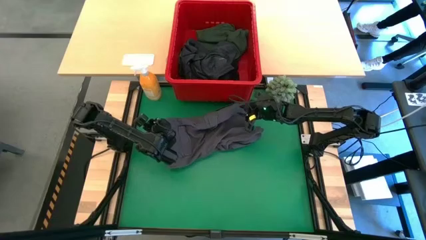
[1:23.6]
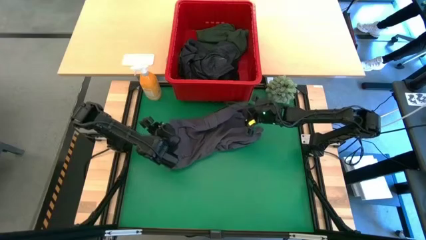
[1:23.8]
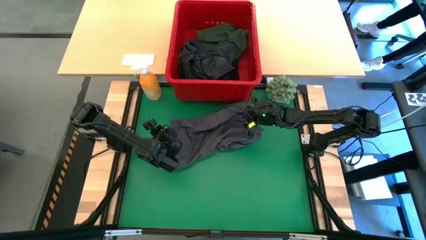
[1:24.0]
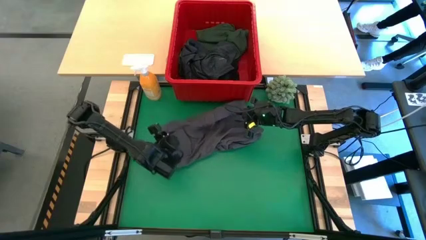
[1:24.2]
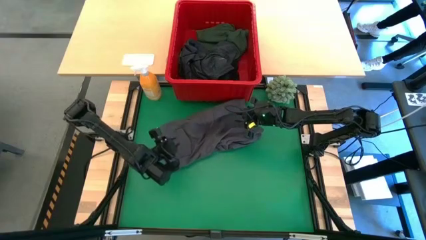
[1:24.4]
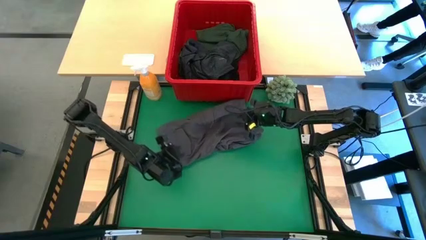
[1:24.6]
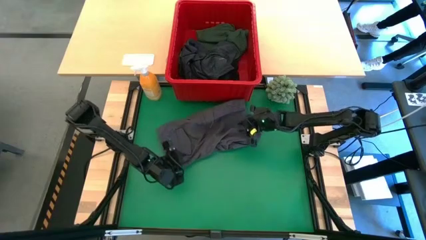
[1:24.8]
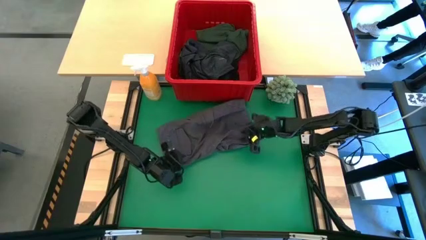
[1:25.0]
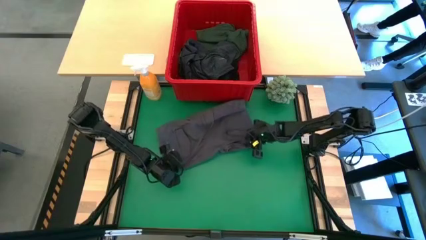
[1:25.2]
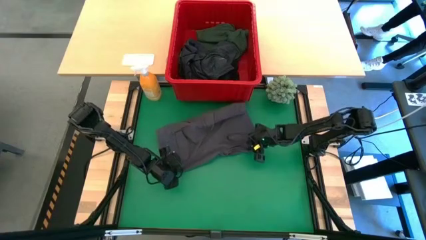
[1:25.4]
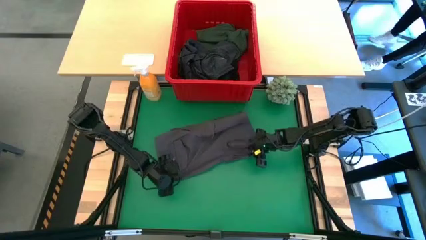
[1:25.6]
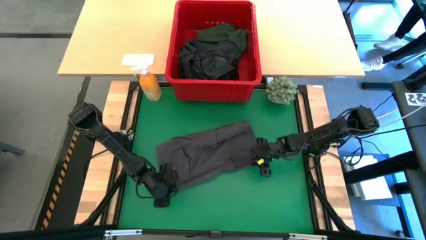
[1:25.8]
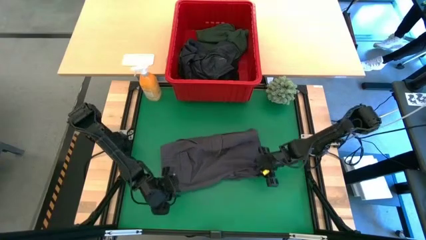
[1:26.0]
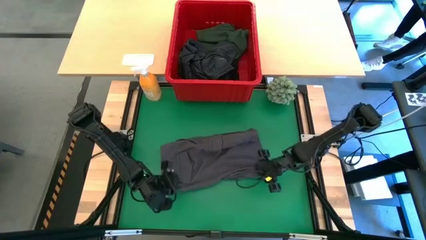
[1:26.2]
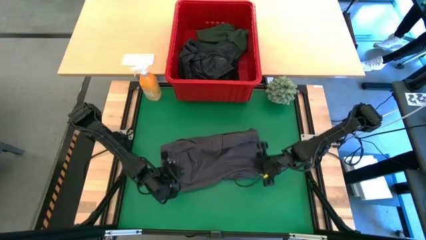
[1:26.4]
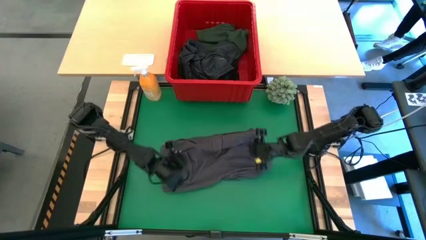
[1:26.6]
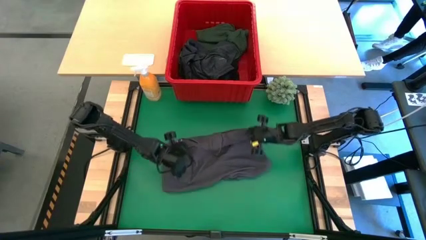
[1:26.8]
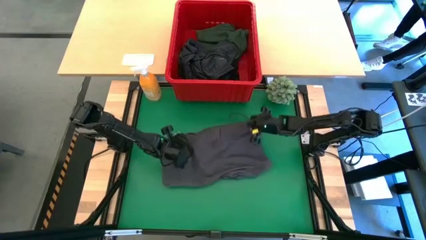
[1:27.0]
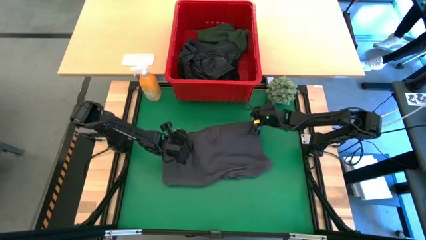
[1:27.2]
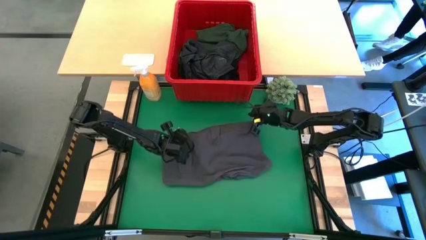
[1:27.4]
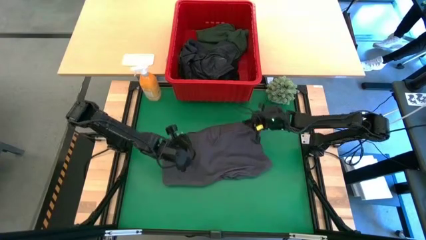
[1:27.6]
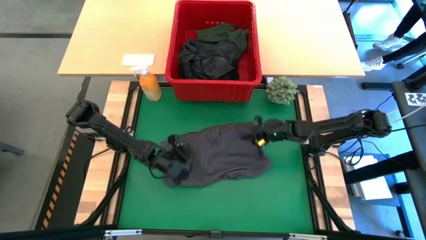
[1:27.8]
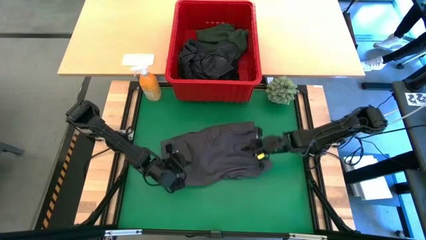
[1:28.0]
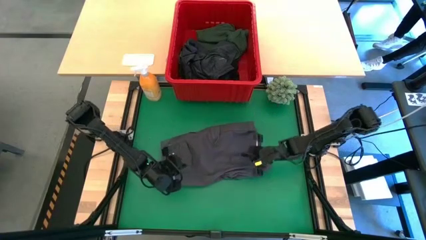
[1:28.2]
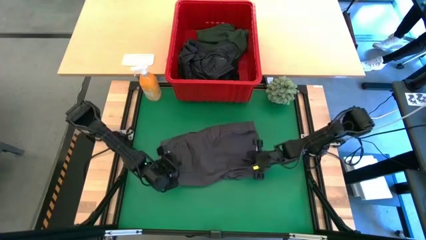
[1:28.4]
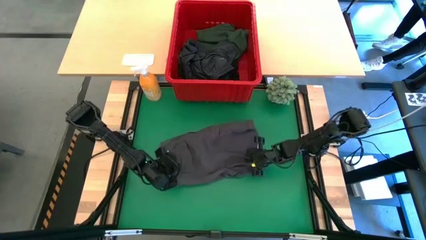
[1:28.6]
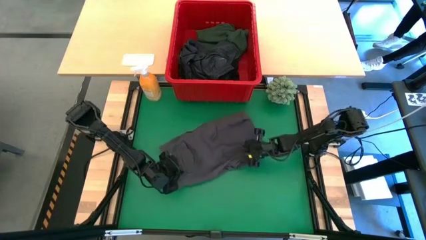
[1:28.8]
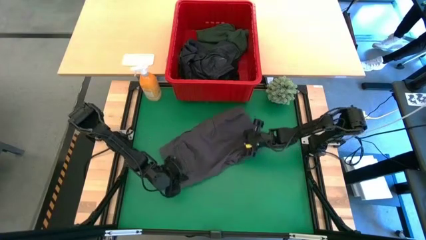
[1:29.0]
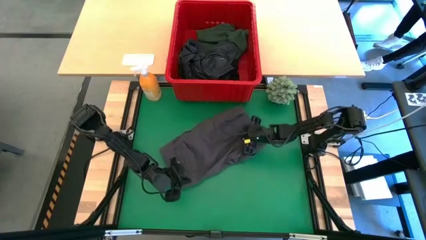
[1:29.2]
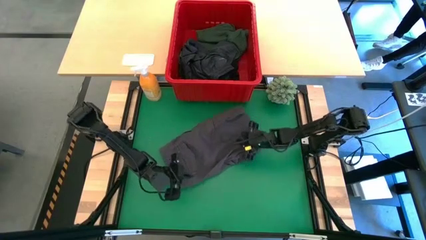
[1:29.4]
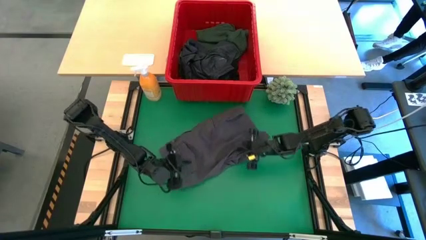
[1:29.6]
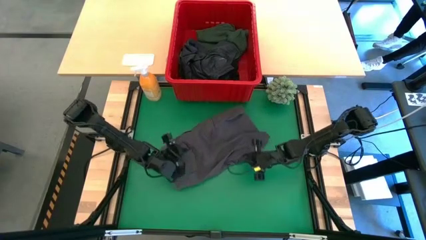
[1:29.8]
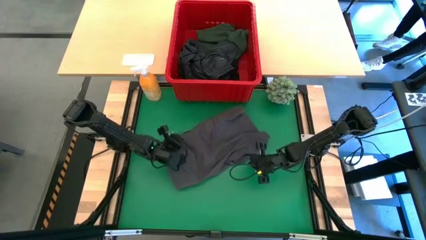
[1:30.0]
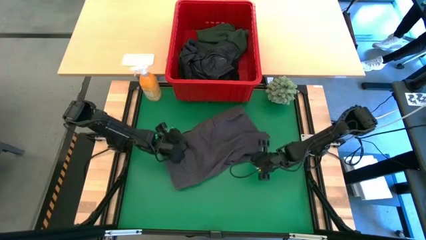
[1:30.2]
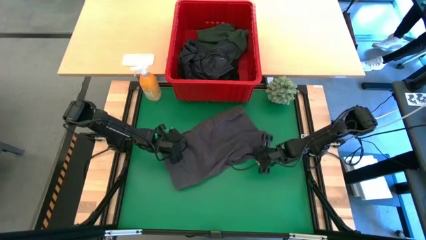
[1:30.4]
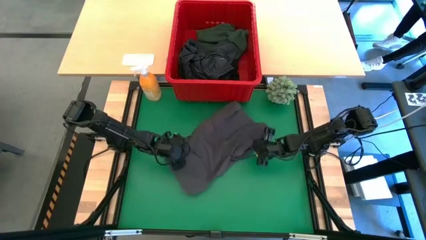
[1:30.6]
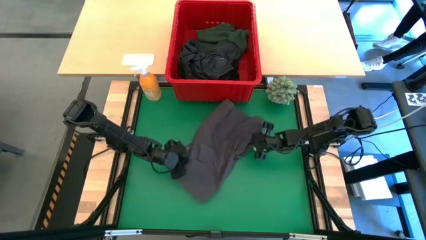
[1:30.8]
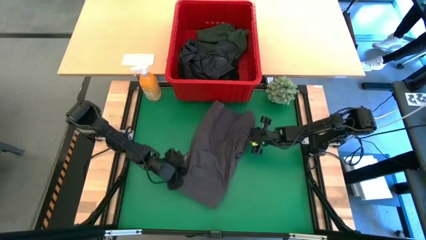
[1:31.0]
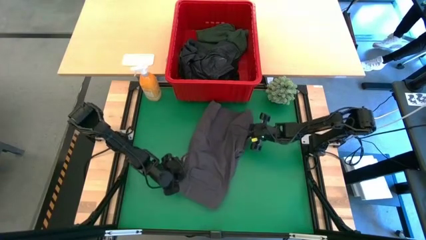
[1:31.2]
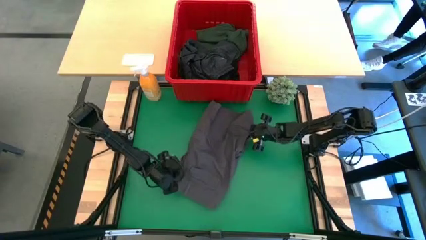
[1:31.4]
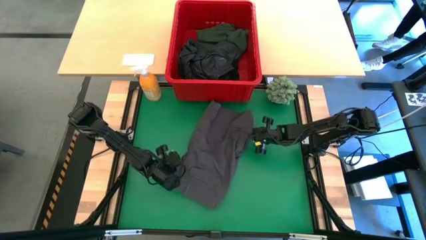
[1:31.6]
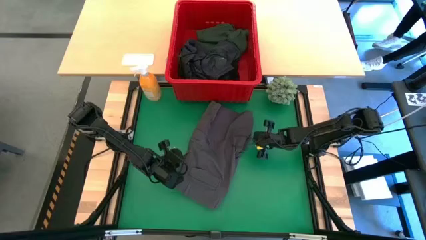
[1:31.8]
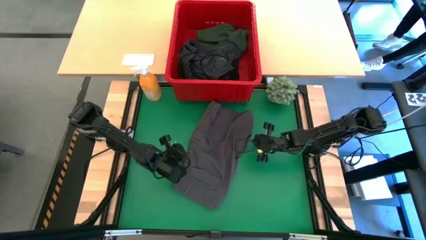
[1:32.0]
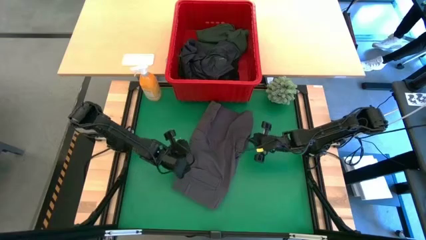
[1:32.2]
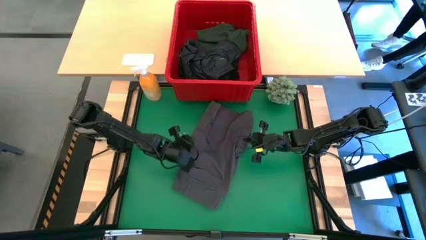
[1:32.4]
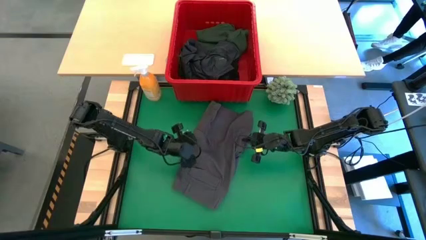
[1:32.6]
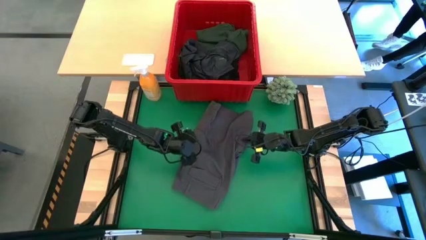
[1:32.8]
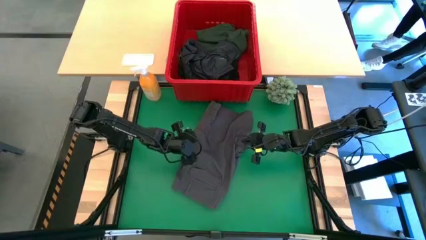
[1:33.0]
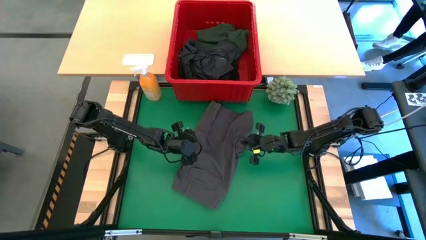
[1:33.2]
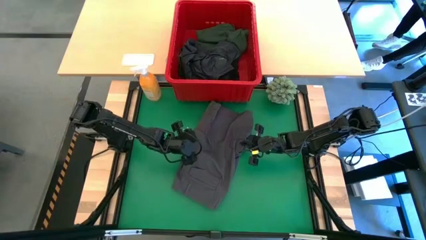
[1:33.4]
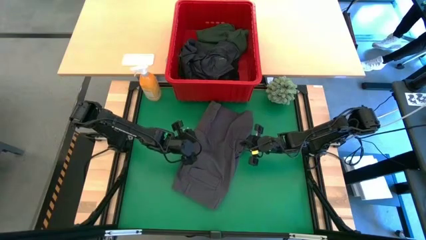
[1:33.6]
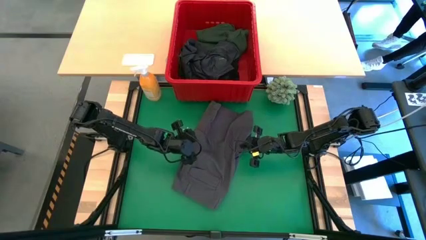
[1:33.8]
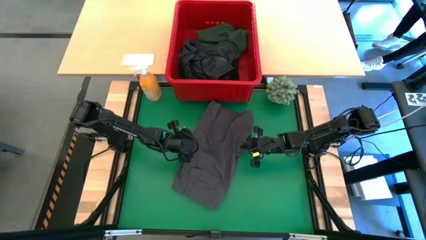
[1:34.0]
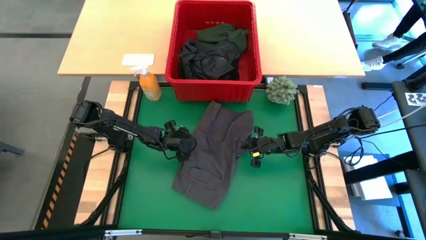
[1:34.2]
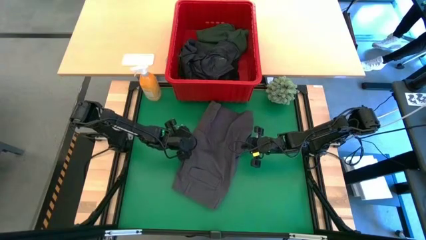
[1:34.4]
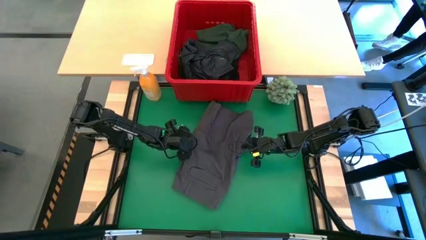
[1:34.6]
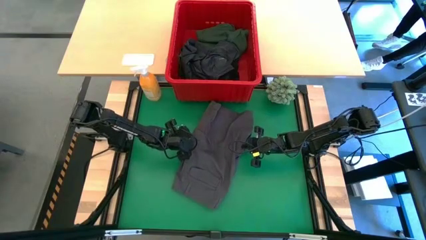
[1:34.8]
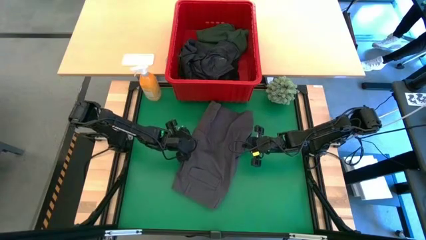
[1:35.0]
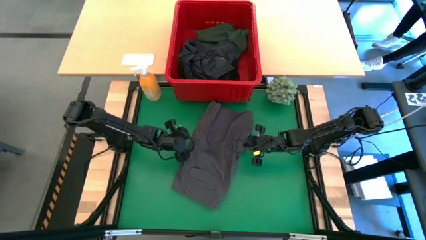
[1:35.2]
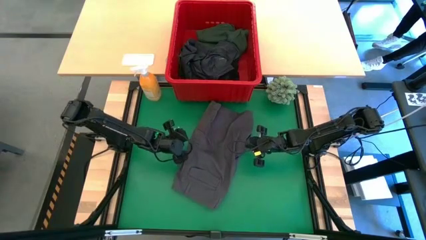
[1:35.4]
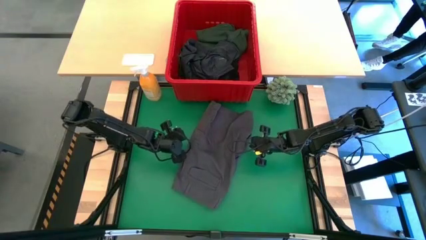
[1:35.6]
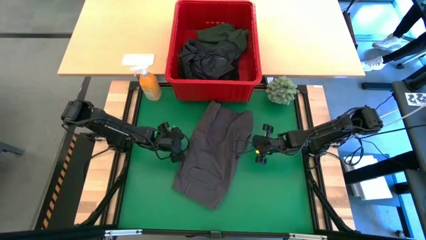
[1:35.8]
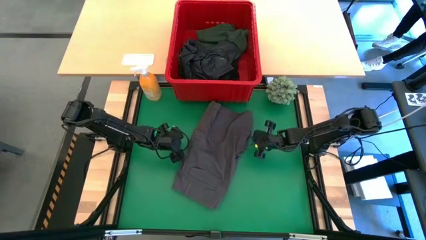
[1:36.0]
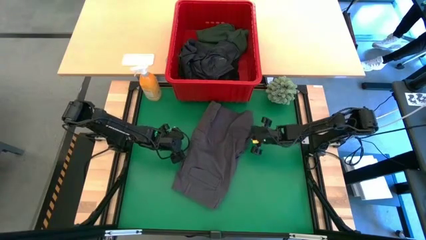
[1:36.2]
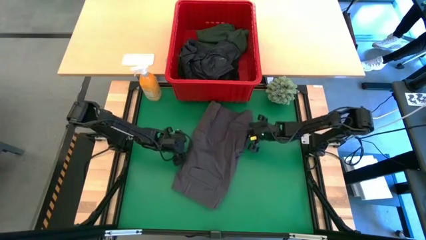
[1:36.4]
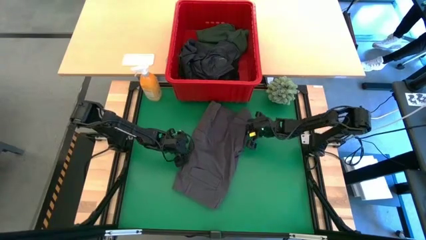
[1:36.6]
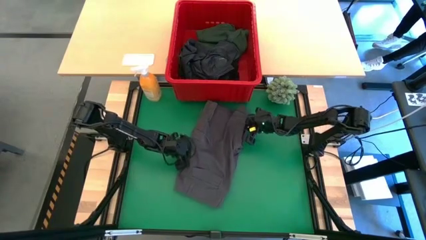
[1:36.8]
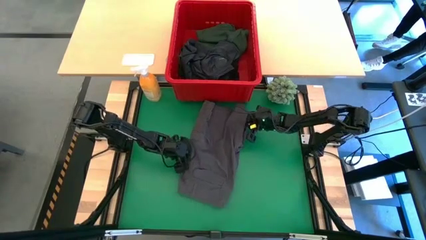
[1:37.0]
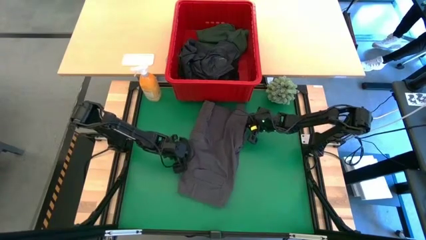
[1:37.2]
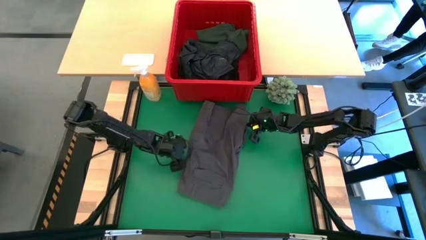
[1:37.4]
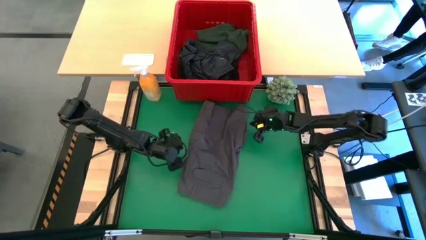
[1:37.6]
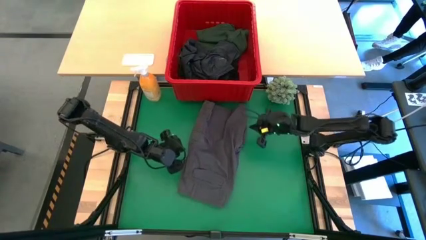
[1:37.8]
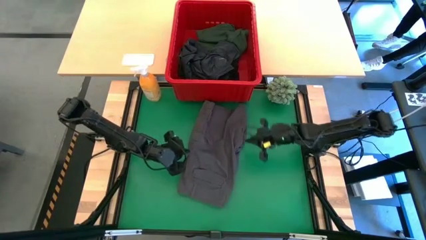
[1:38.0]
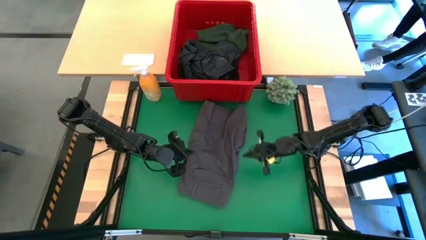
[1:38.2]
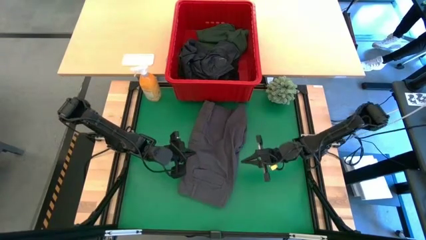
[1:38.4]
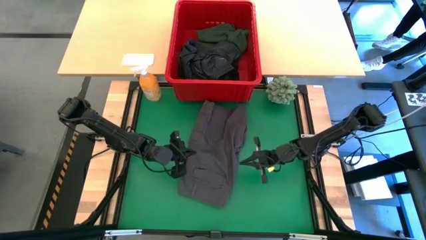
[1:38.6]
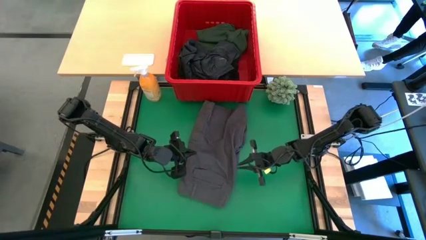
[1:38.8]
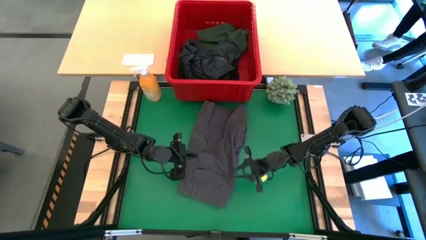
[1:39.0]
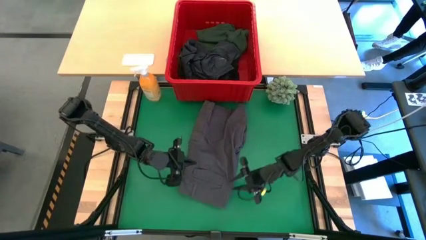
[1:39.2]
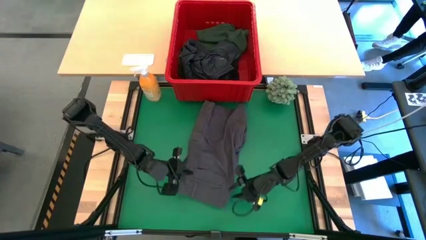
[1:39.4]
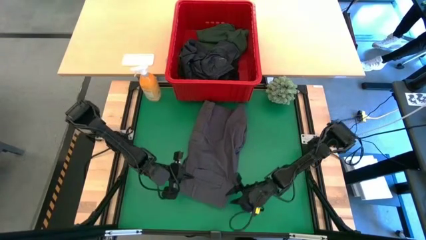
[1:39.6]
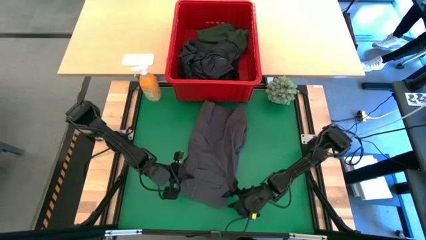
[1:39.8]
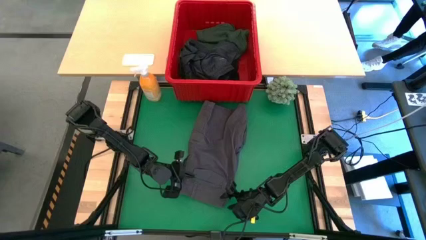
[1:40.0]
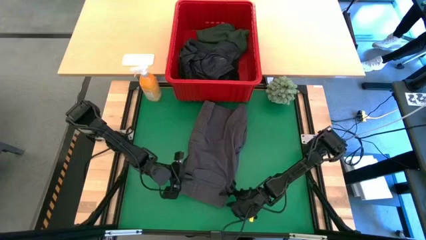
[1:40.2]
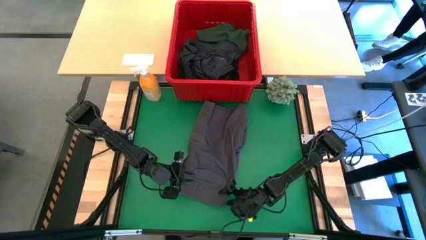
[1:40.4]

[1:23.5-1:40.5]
Task: Fold Laundry from Bin
Fold the gray short
